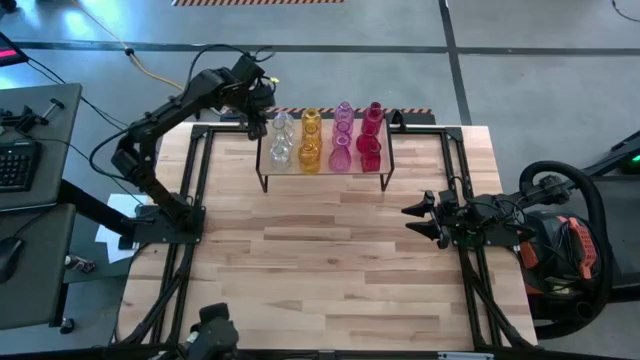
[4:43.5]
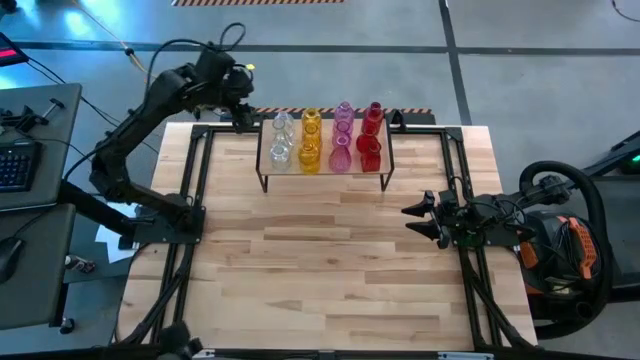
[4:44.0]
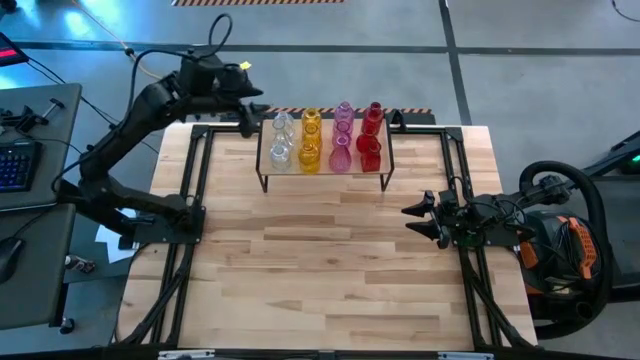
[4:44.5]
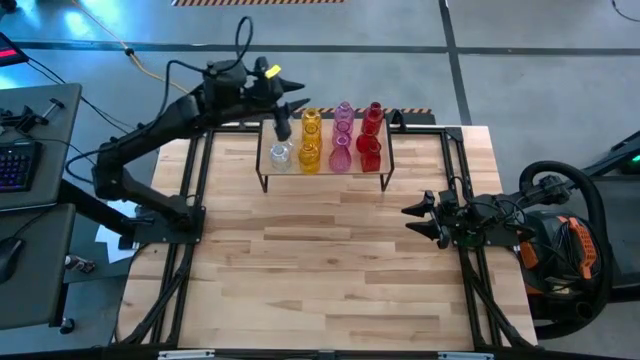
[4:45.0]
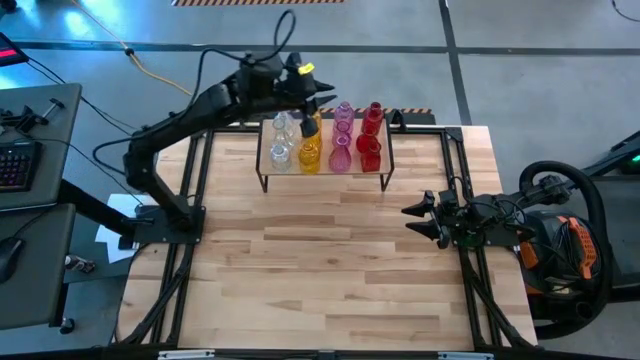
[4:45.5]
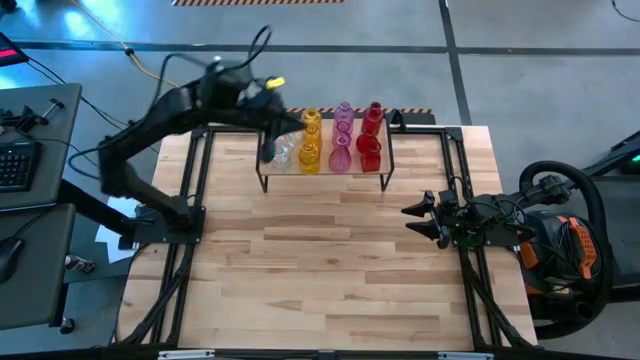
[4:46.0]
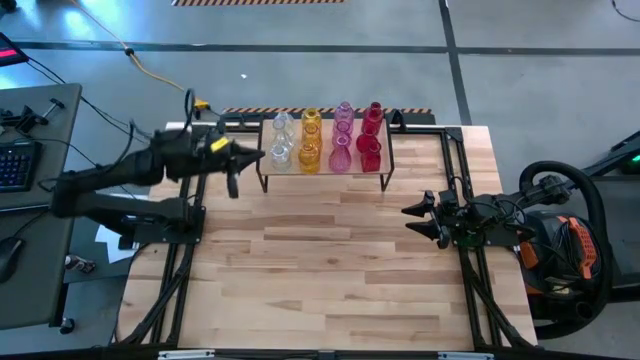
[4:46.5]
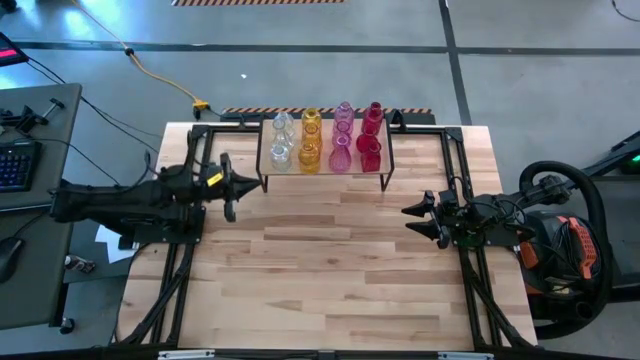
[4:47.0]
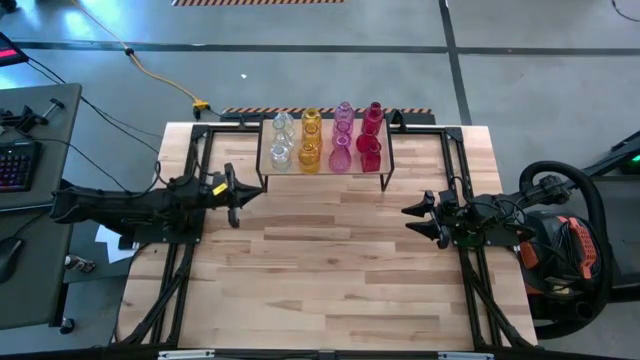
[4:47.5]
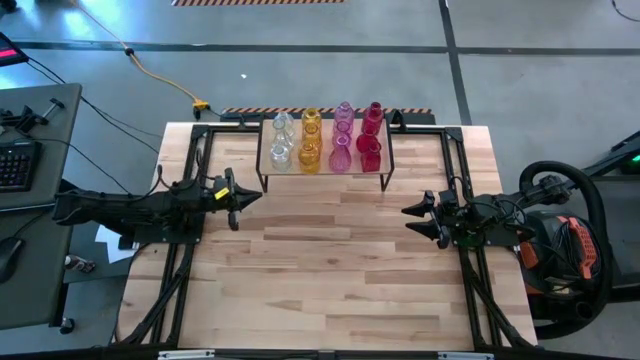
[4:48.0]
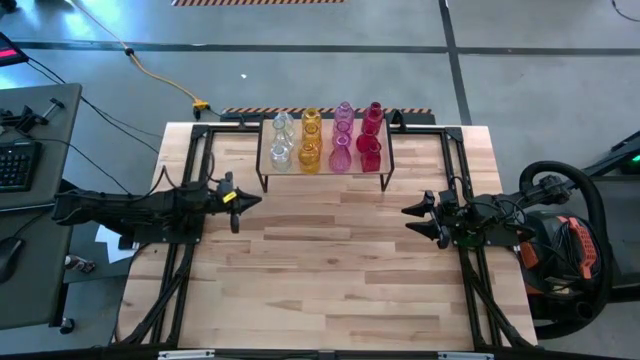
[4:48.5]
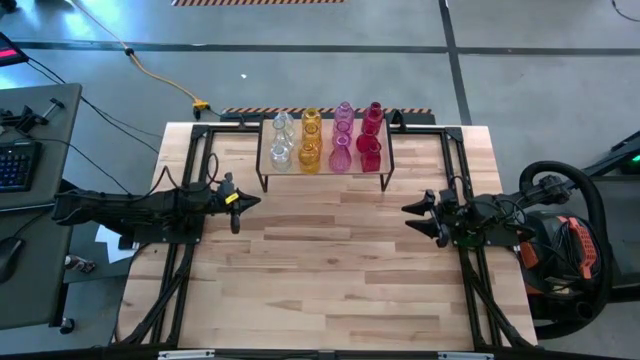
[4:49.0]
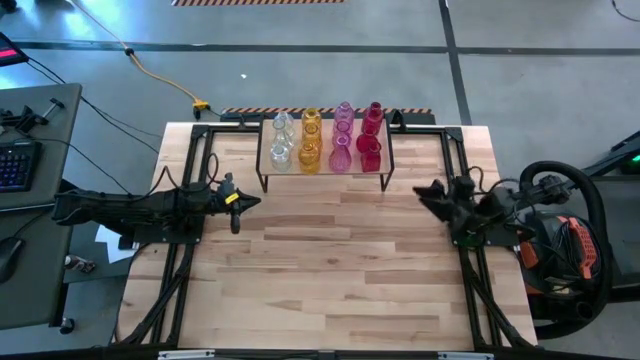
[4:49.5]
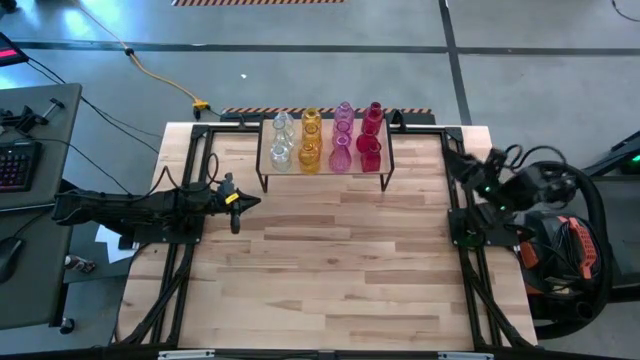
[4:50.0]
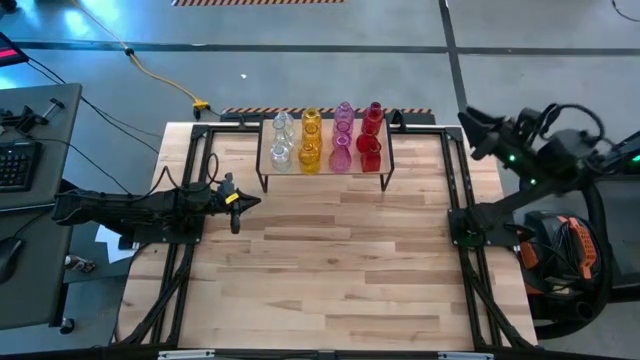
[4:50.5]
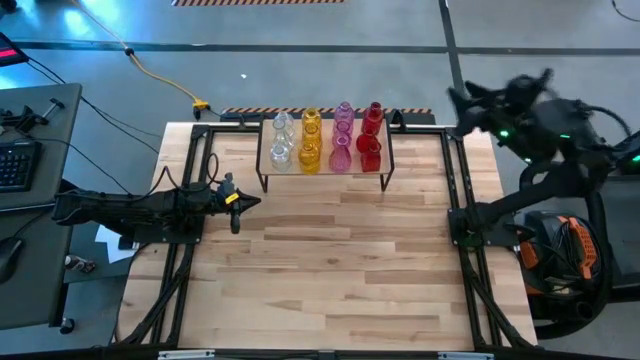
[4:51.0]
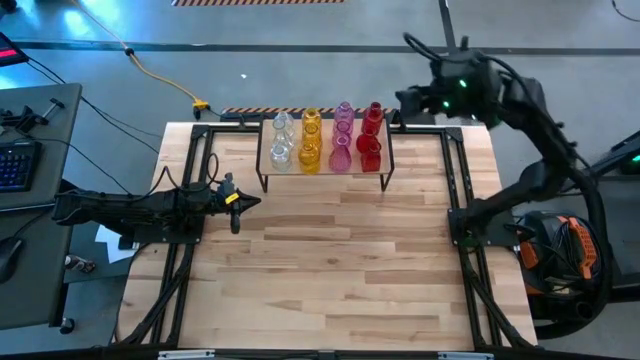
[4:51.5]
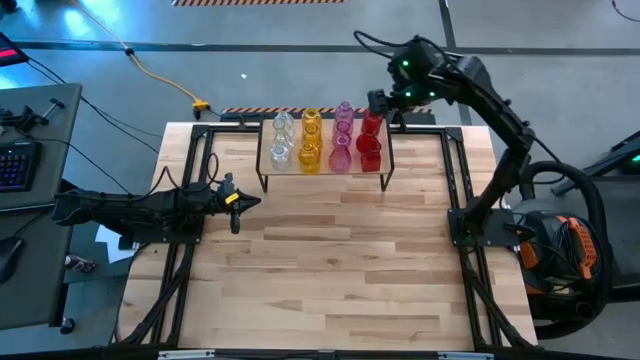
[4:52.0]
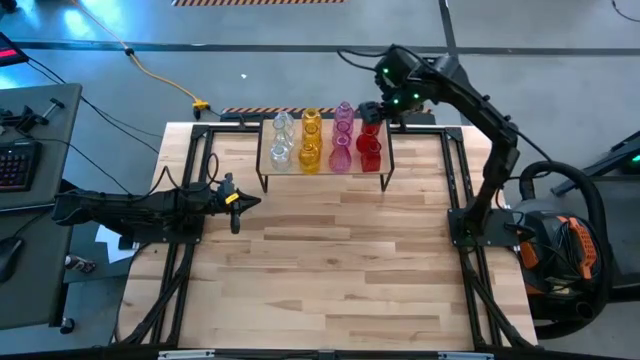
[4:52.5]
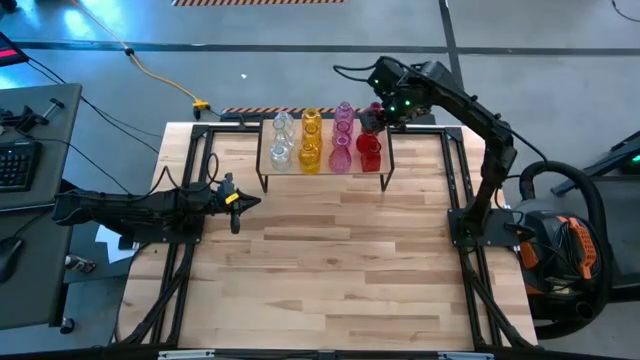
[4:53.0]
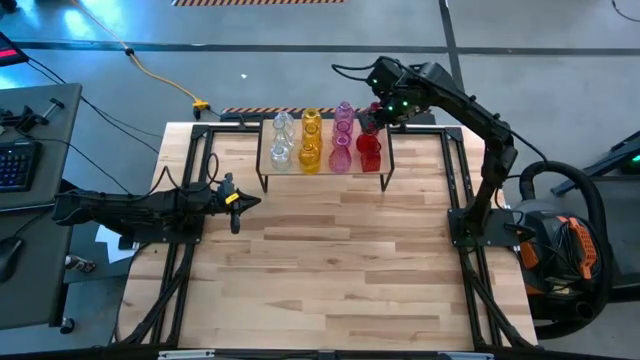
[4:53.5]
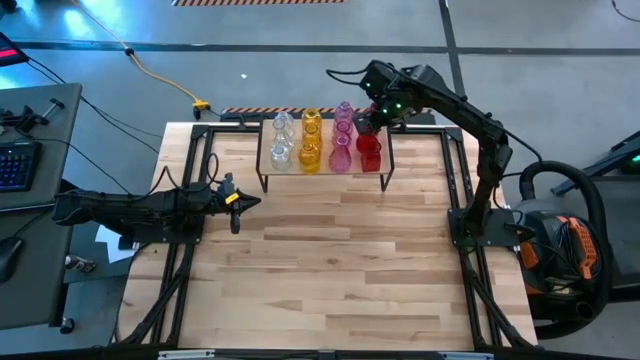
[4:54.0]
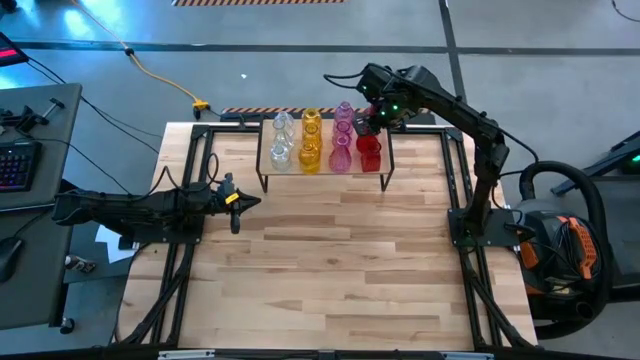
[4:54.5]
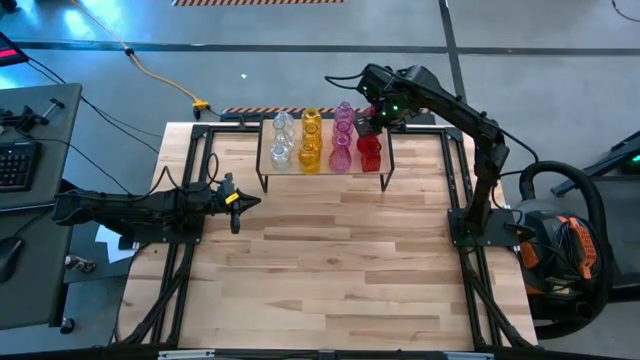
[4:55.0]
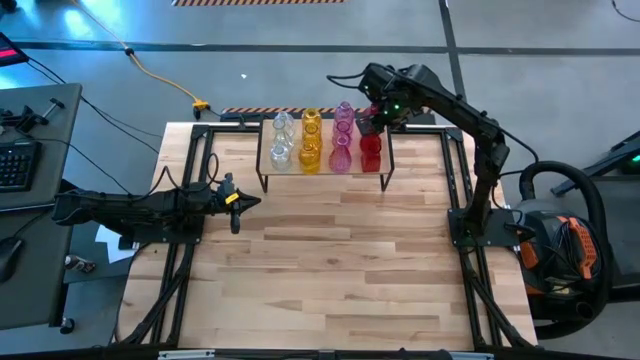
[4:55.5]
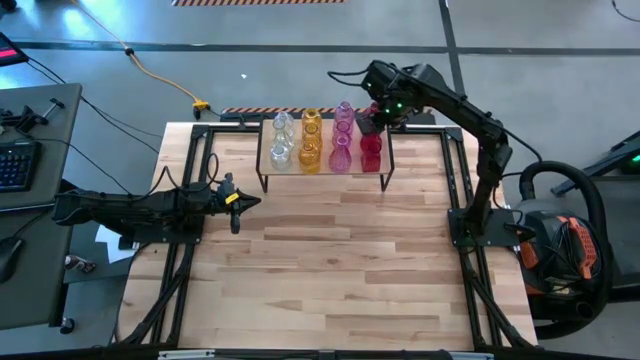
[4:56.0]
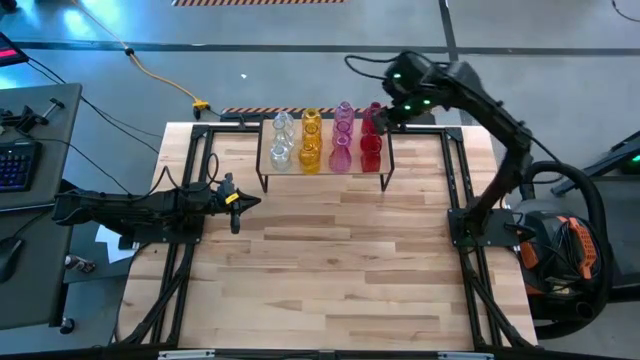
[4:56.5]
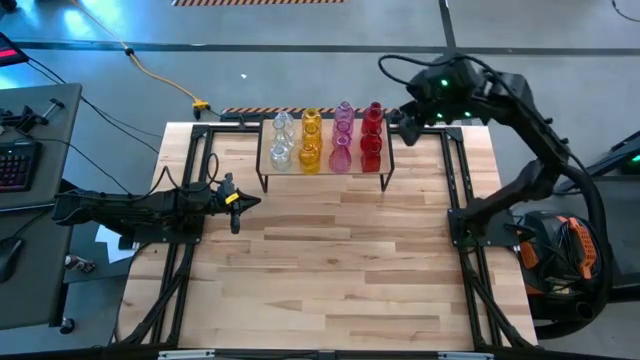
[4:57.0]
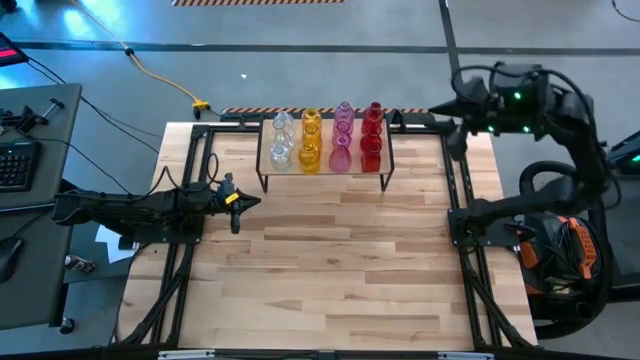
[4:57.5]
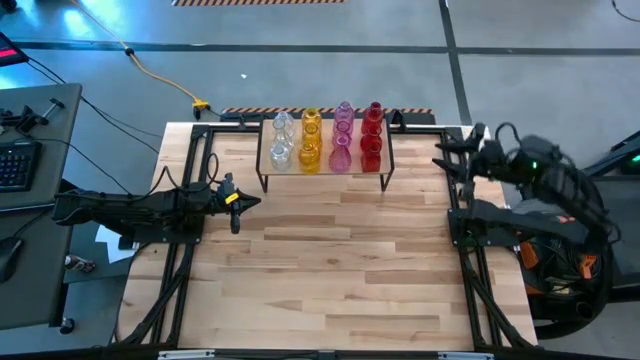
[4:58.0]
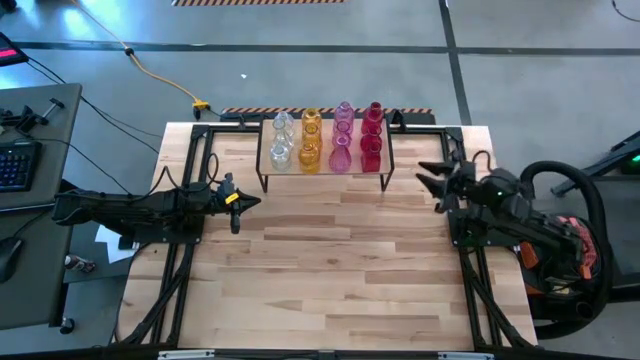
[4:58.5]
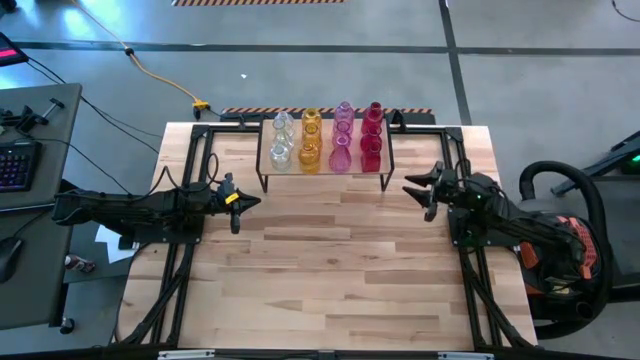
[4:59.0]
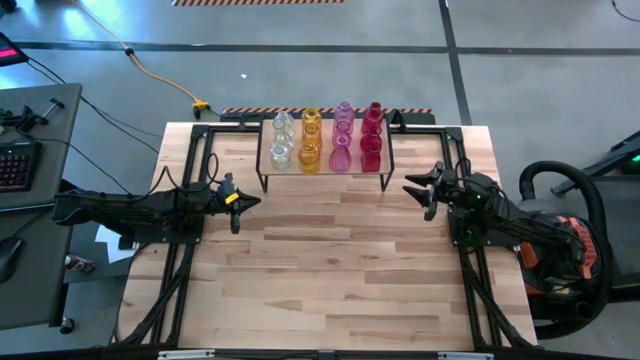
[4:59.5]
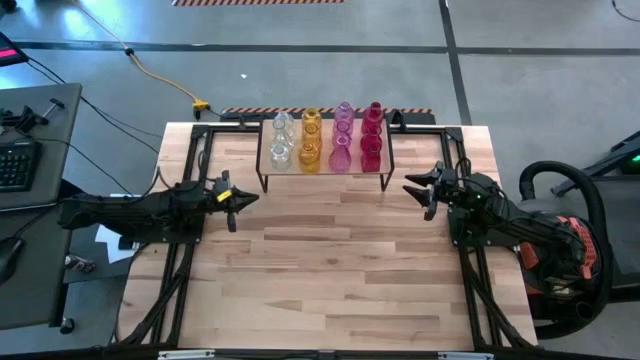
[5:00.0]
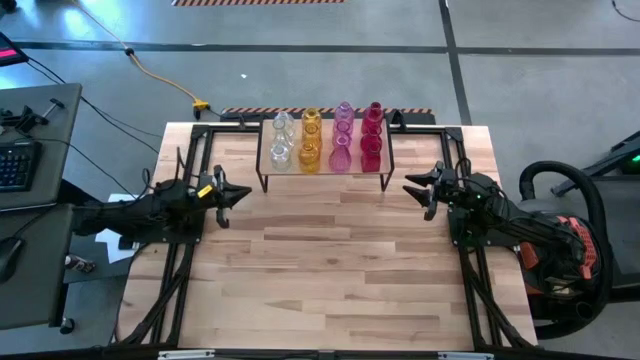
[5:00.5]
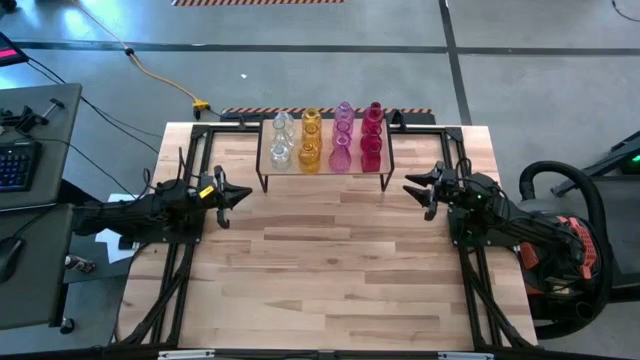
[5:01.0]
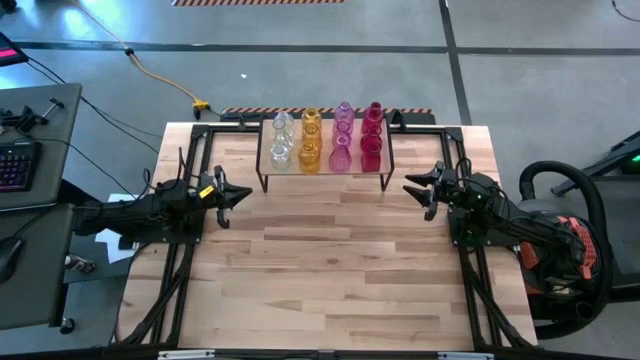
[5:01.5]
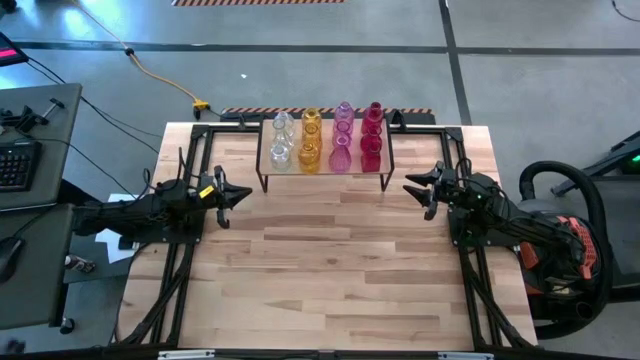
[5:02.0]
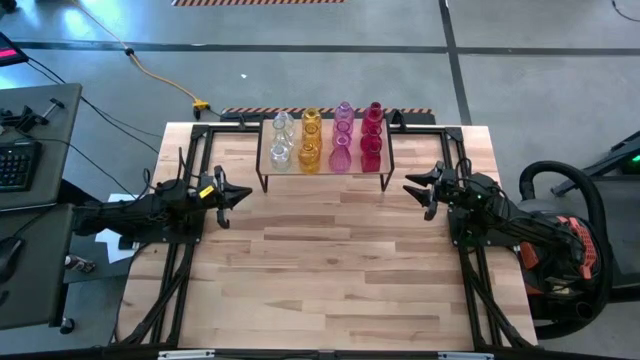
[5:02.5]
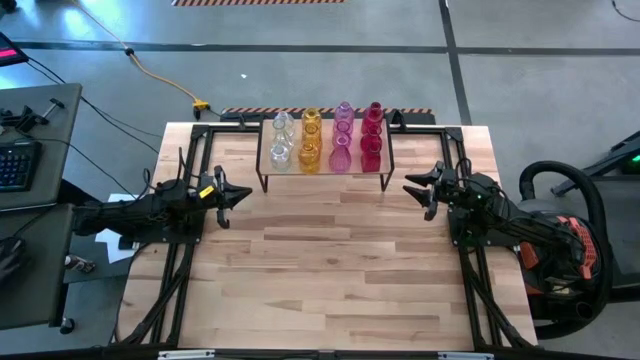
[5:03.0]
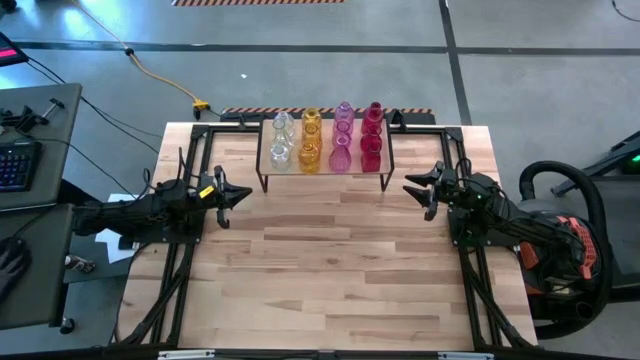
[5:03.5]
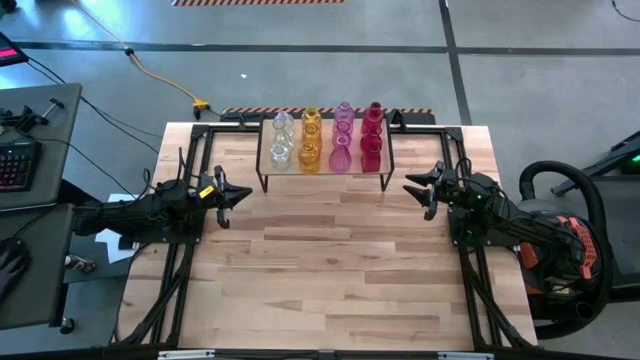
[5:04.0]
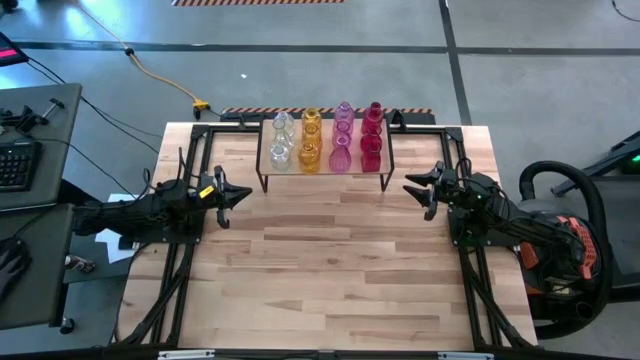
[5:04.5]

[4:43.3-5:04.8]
Task: sort vases onto shelf
Return to Home Position
